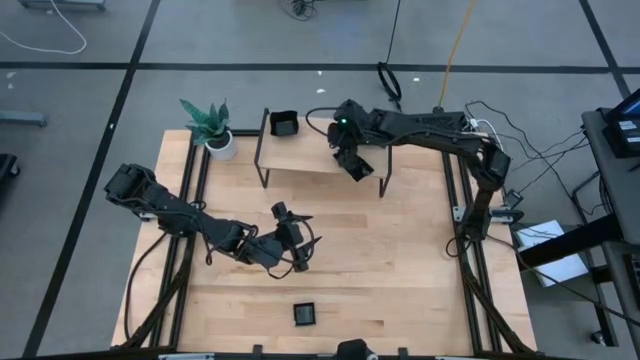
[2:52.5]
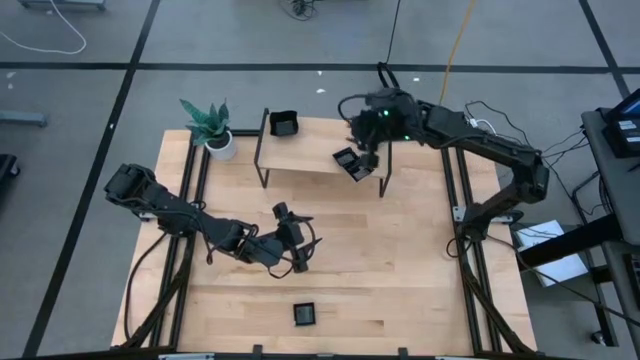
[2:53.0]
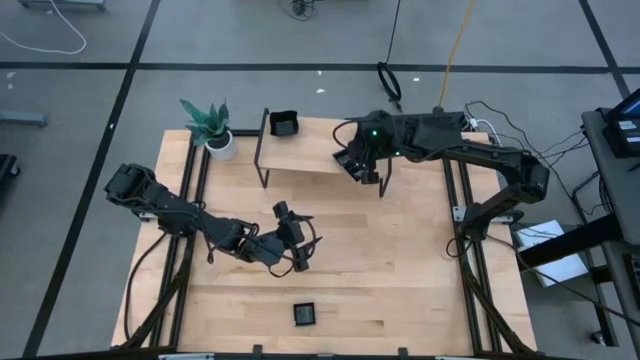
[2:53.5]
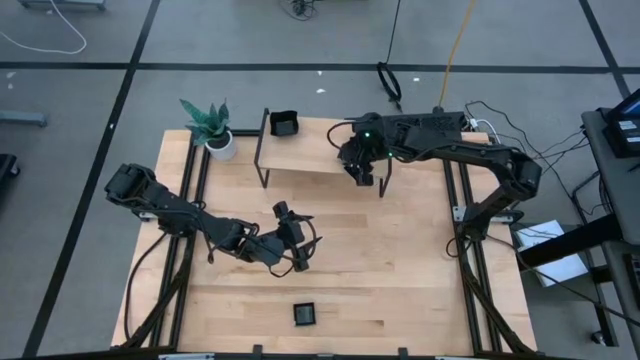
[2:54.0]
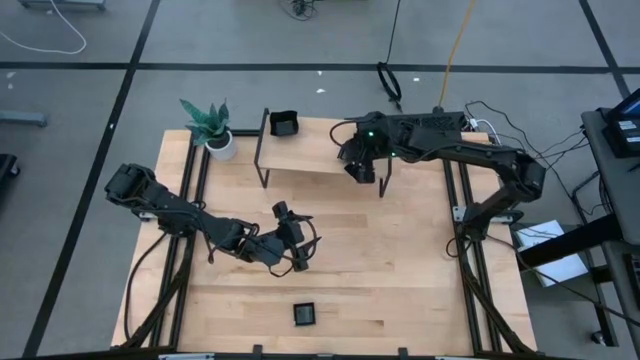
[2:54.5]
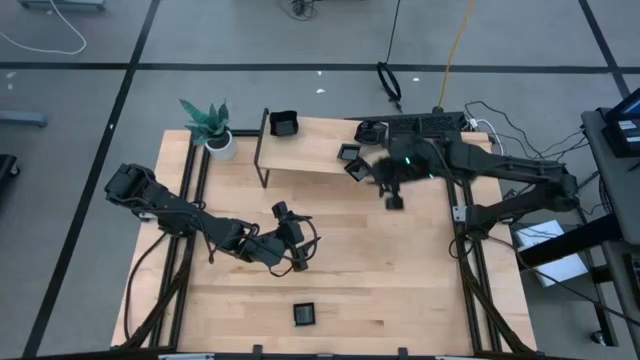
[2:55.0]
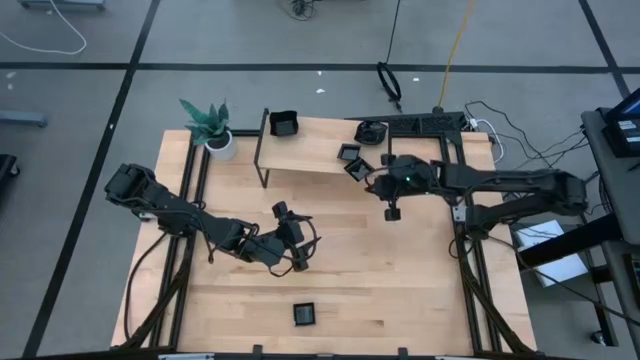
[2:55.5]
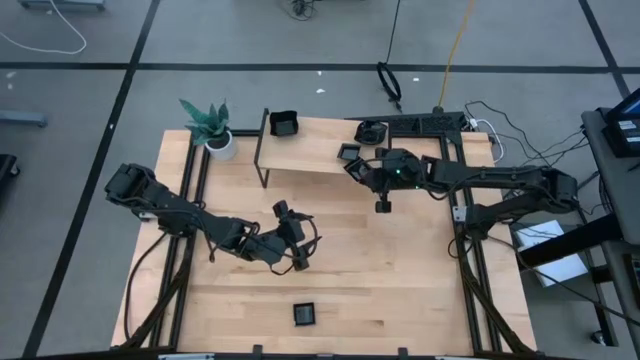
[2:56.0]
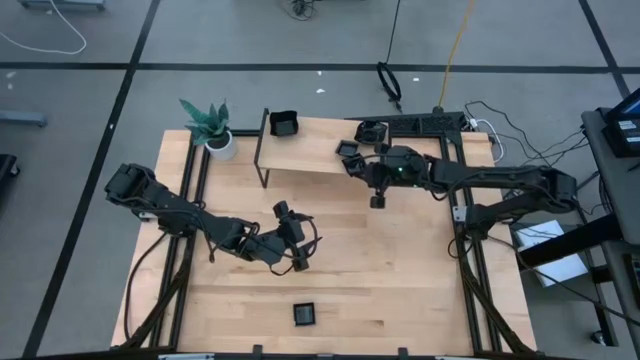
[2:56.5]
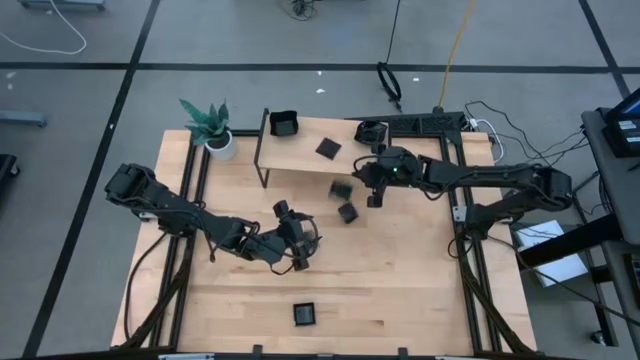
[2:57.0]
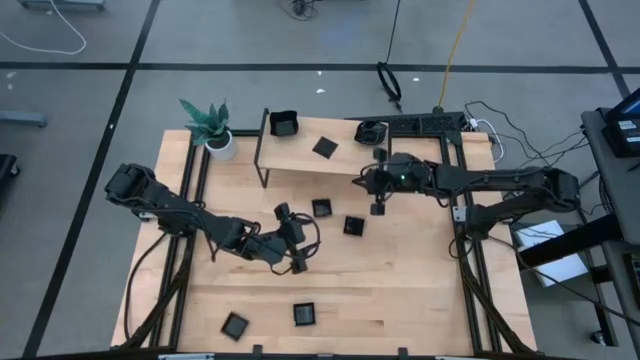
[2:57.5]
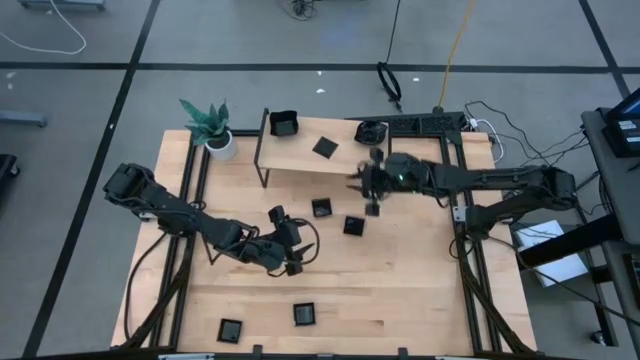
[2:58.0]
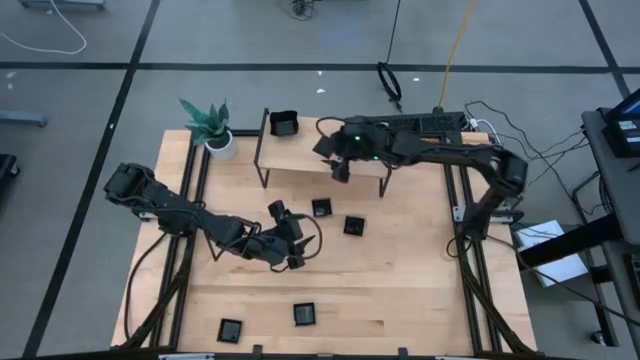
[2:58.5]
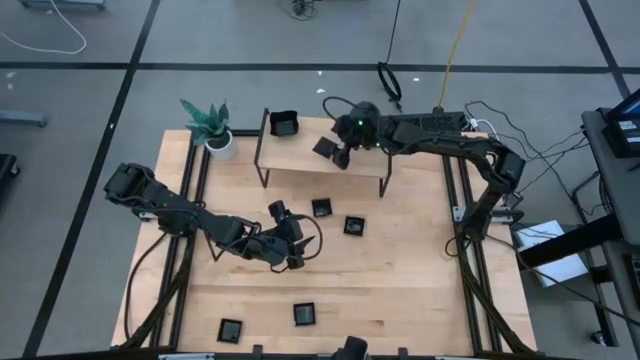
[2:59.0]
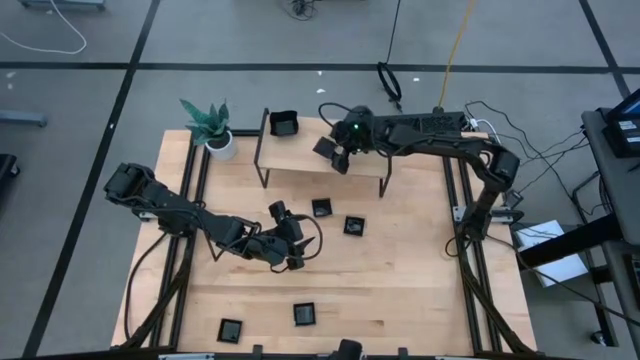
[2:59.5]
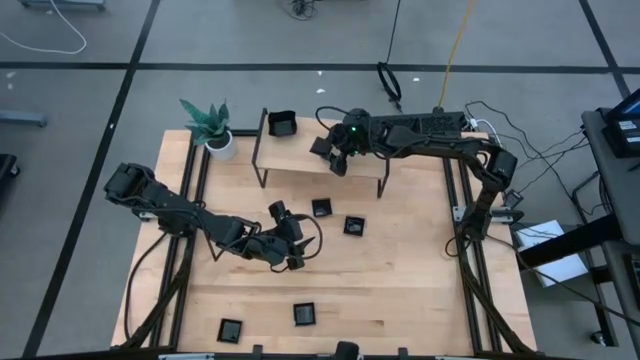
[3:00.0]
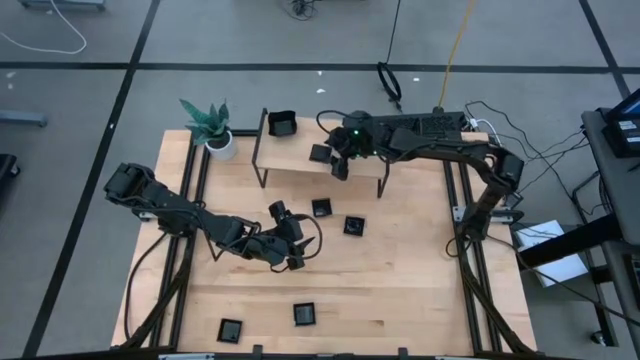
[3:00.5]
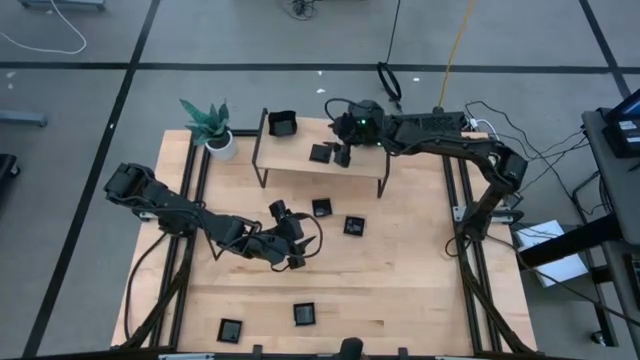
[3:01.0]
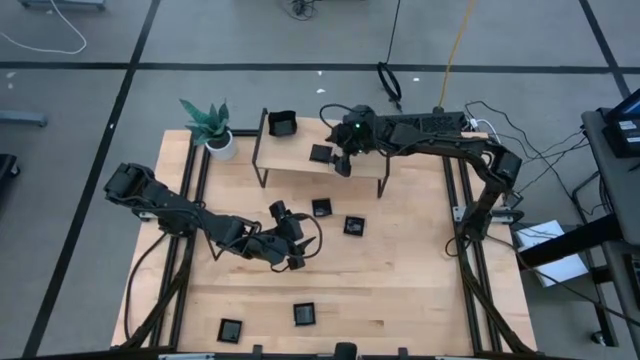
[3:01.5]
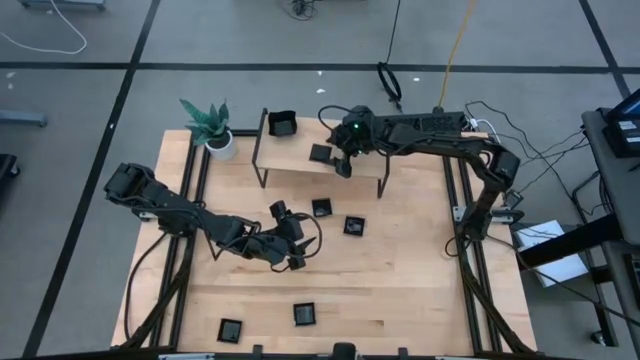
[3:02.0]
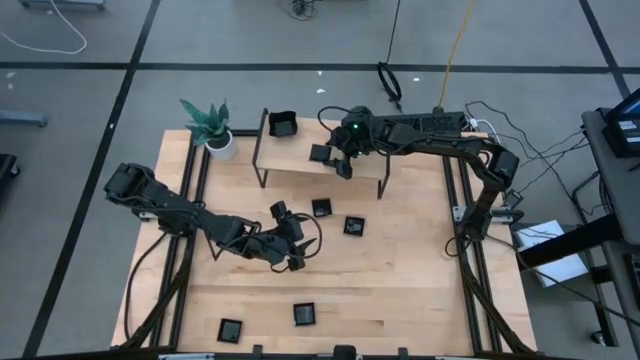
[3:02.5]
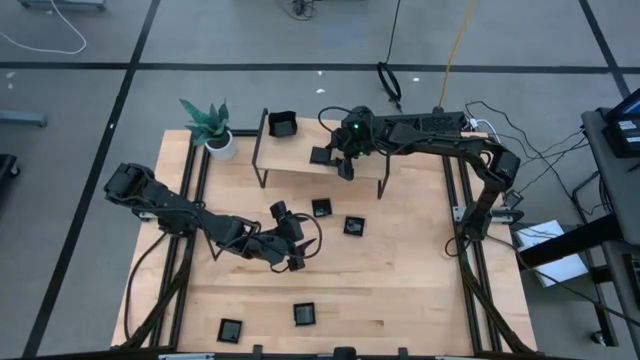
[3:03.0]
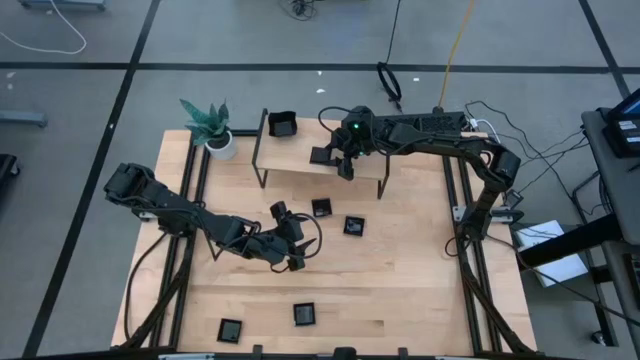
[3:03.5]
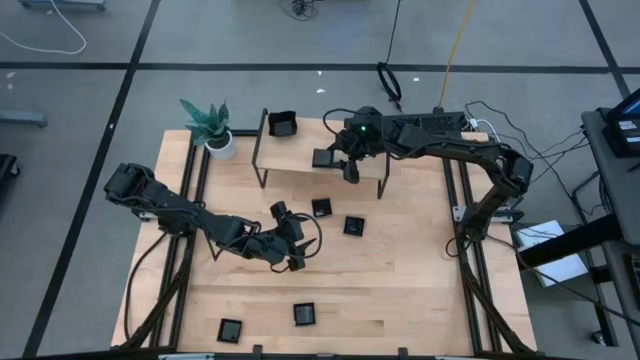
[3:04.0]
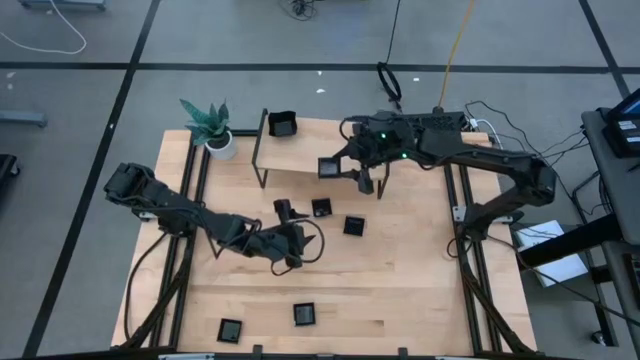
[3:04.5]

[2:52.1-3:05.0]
Task: Pick & Place Mini shaped plates
Stack the black square plate on top of the other black square plates on the shelf

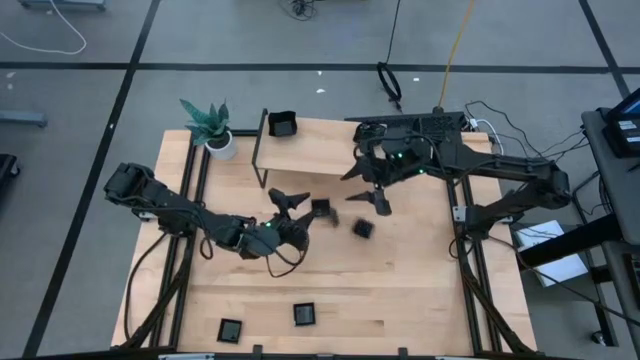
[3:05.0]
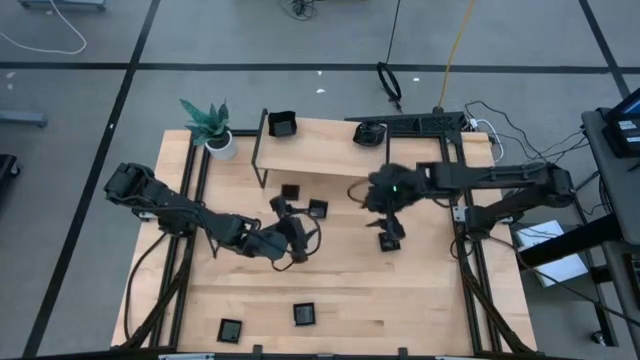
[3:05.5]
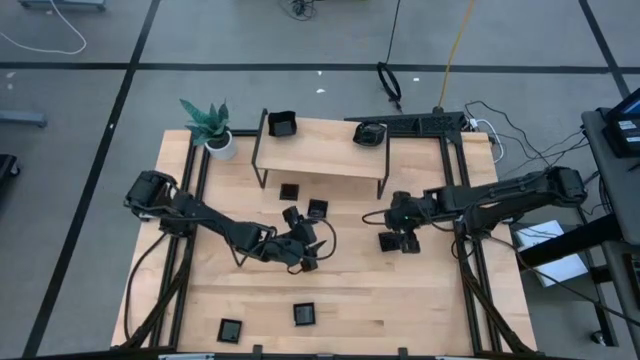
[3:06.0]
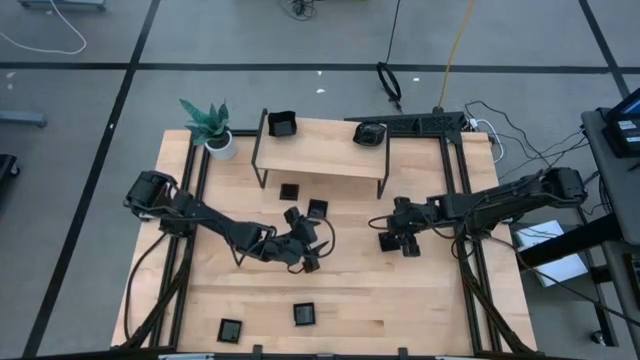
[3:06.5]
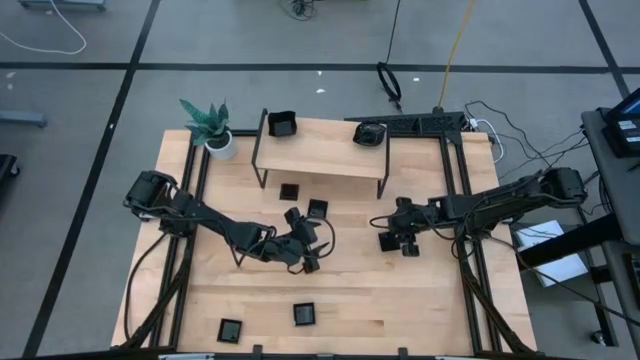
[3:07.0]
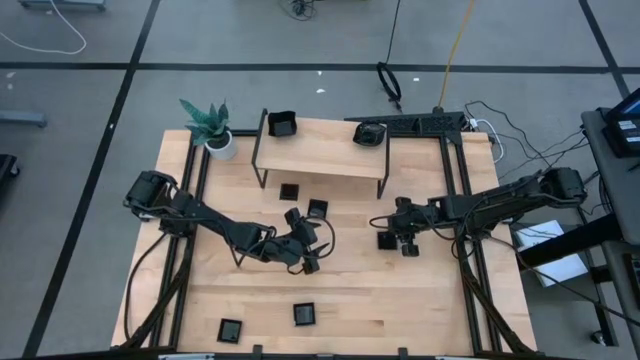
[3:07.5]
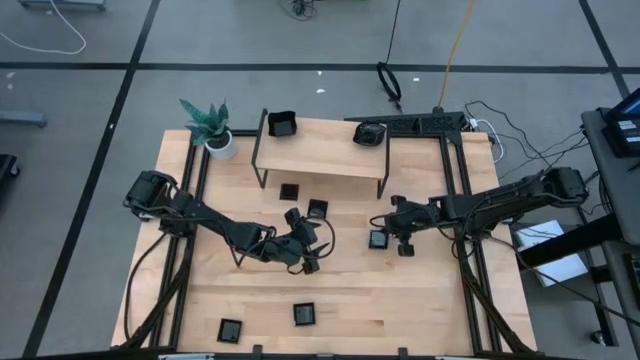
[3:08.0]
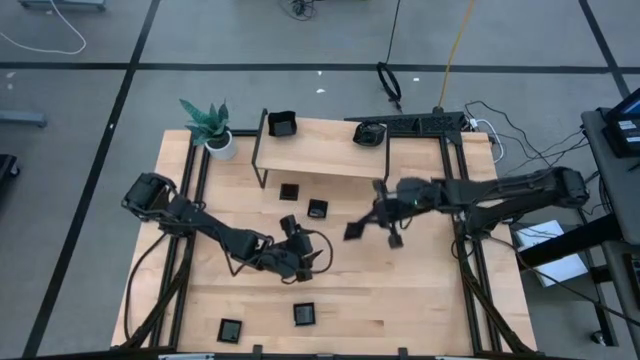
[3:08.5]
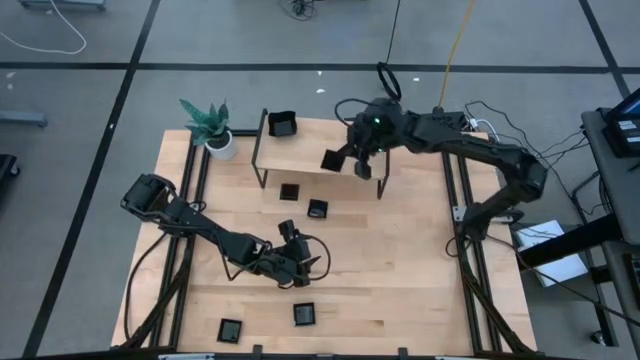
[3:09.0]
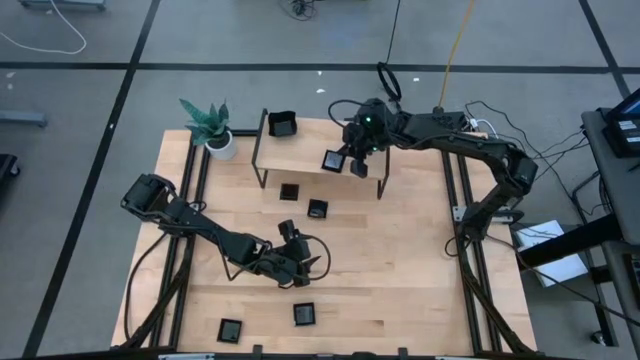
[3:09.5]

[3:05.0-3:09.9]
Put the black square plate on the shelf

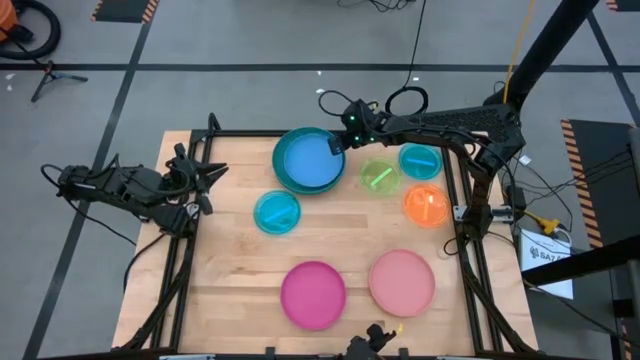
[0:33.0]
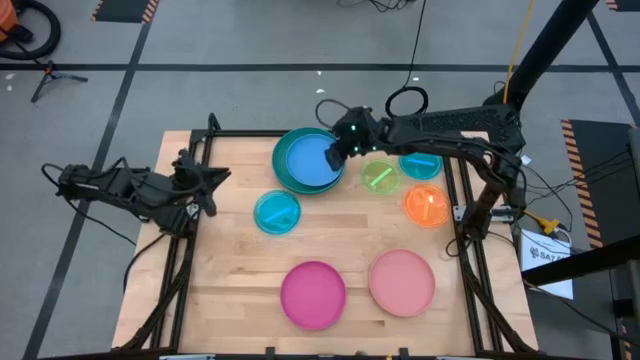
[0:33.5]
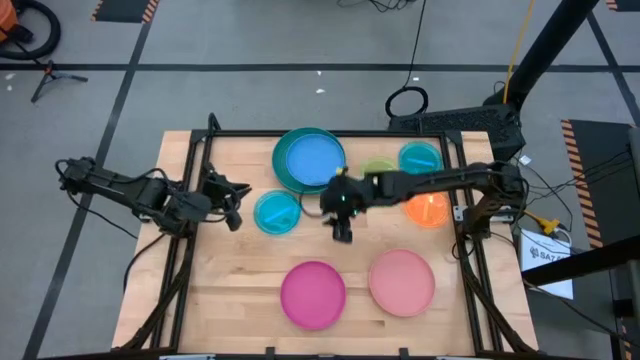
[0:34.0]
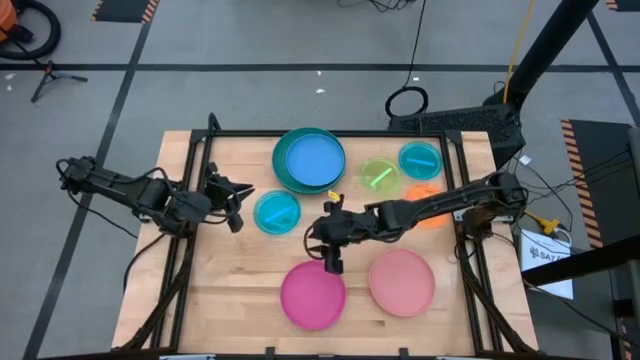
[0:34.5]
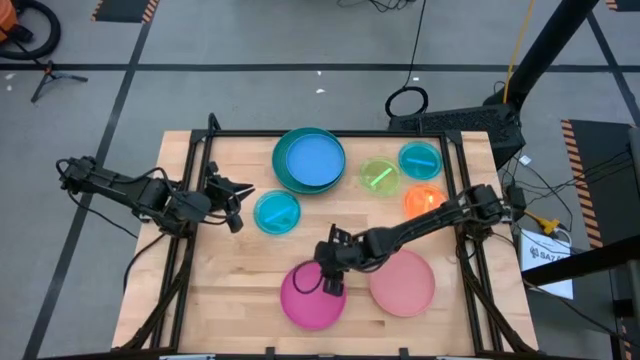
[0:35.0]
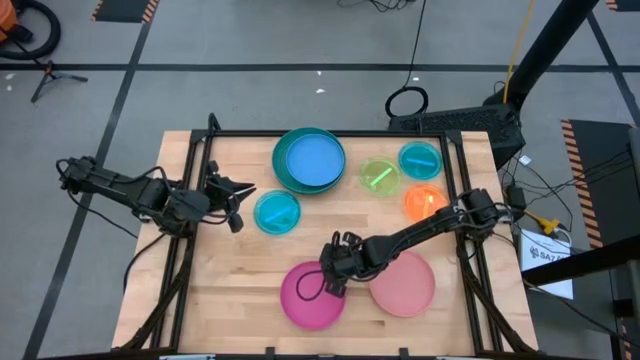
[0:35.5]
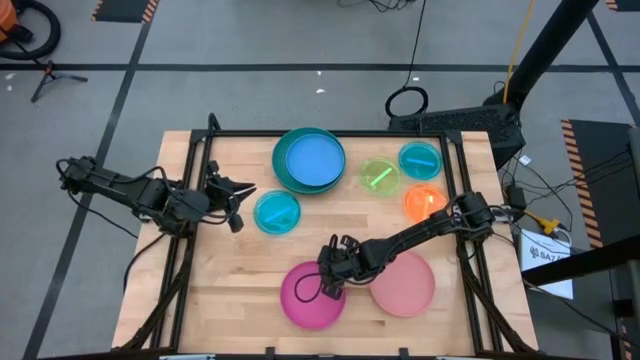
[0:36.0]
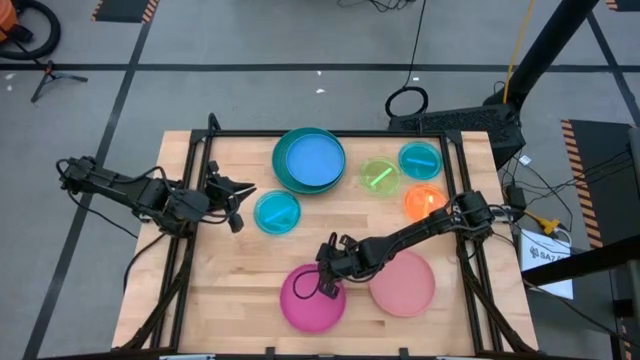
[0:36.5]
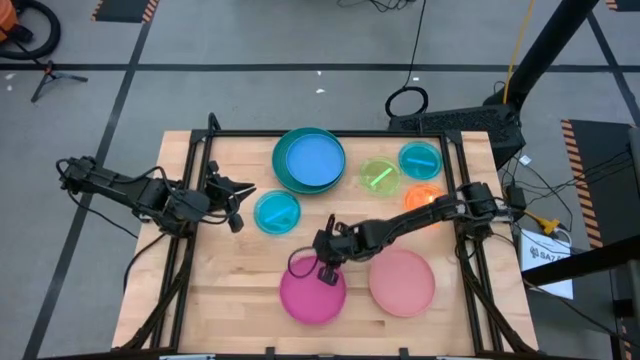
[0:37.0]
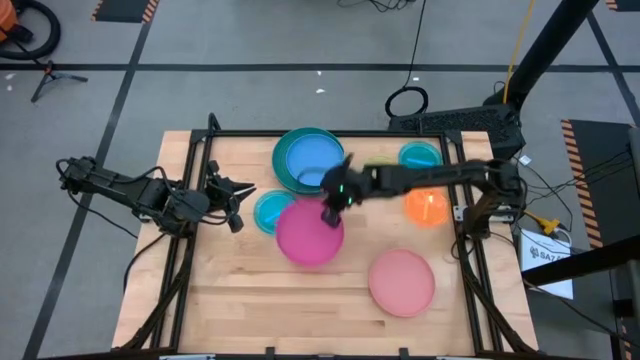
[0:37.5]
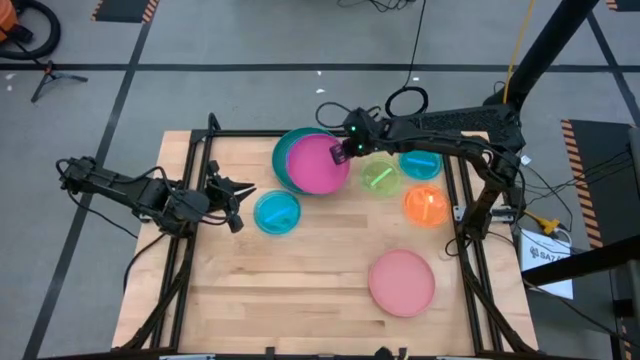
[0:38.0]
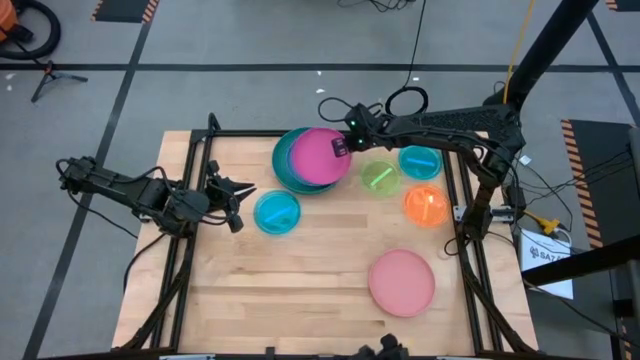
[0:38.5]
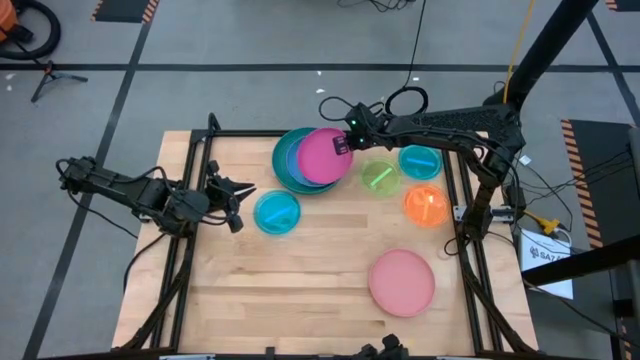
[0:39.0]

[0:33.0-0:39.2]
Task: Stack plastic plates
Stack the dark pink plate on top of the blue plate
